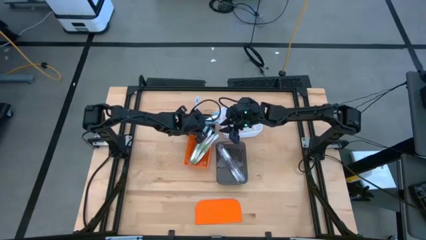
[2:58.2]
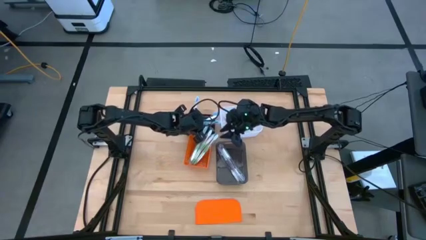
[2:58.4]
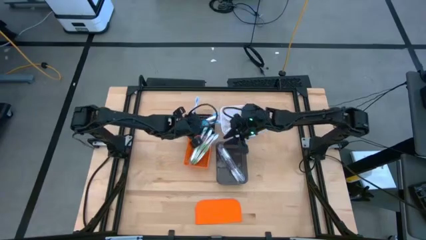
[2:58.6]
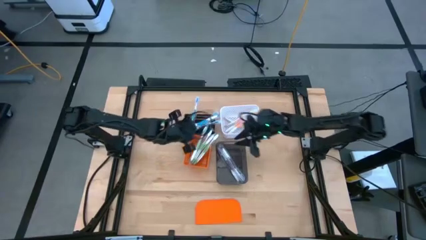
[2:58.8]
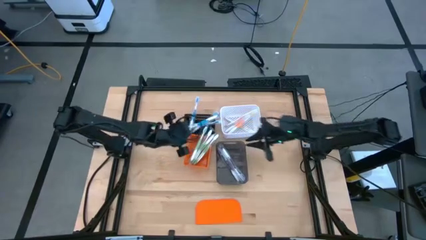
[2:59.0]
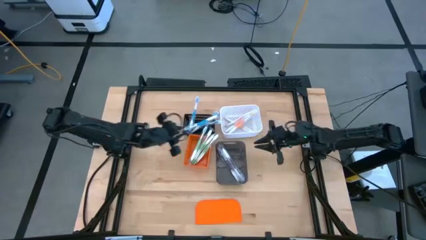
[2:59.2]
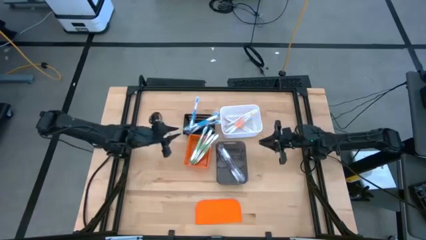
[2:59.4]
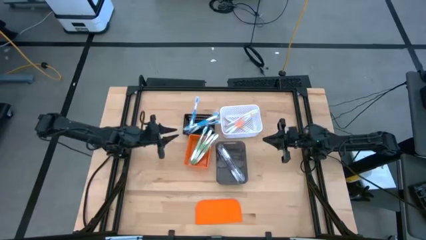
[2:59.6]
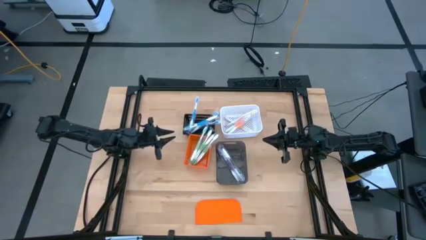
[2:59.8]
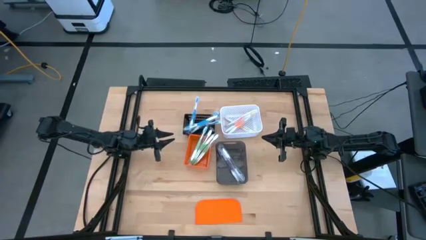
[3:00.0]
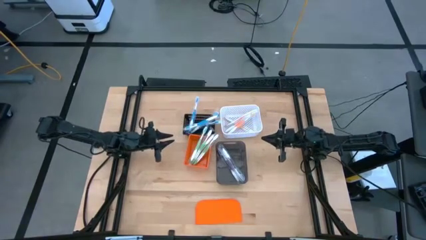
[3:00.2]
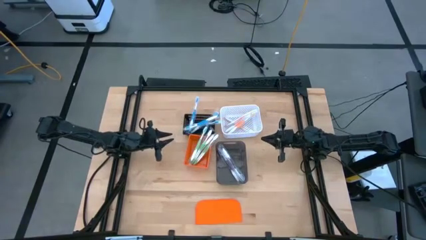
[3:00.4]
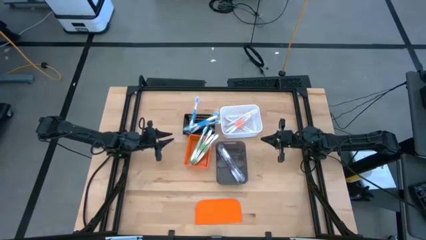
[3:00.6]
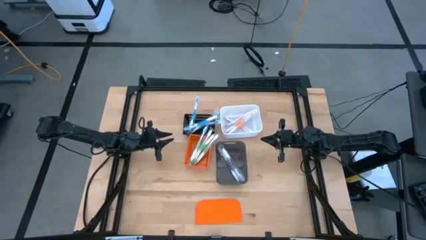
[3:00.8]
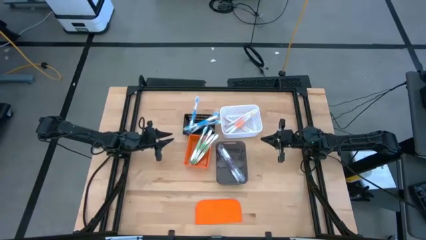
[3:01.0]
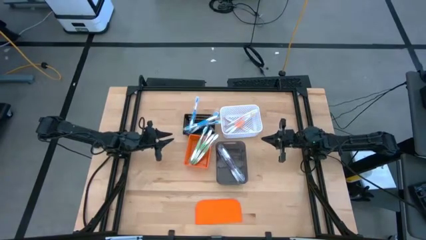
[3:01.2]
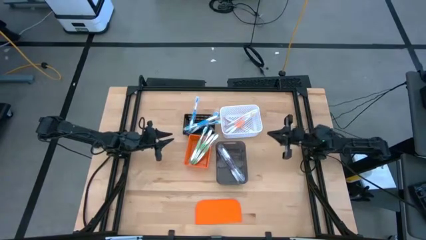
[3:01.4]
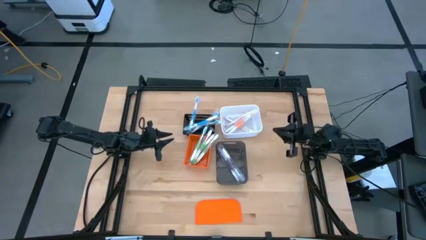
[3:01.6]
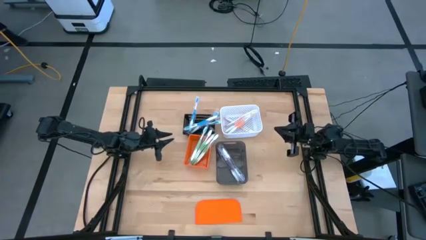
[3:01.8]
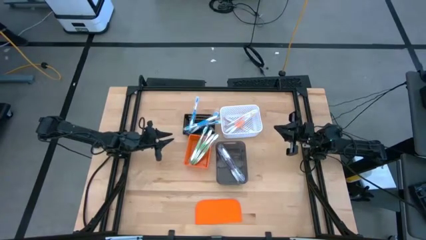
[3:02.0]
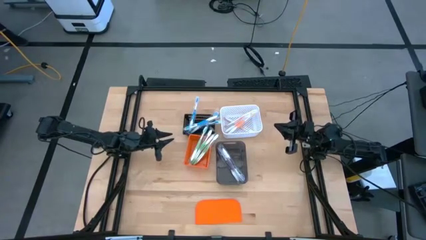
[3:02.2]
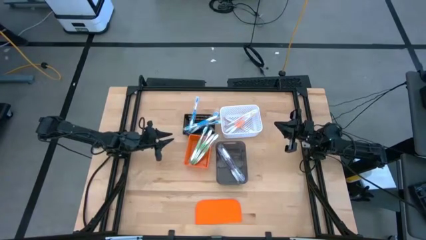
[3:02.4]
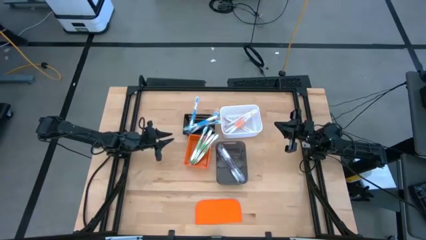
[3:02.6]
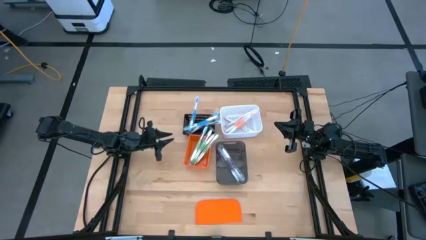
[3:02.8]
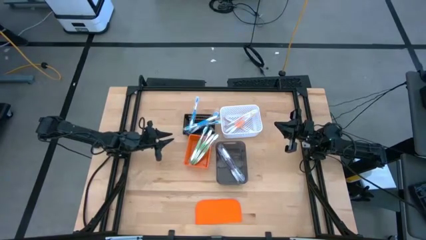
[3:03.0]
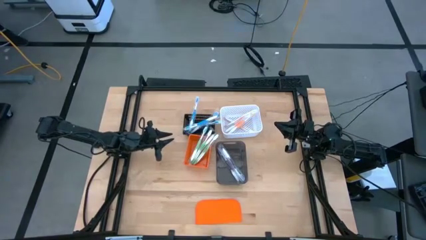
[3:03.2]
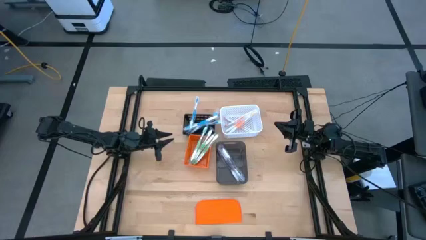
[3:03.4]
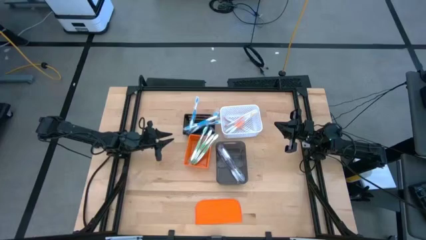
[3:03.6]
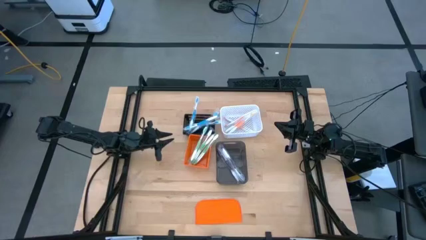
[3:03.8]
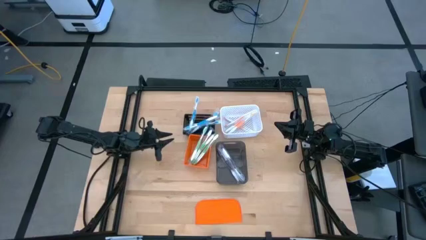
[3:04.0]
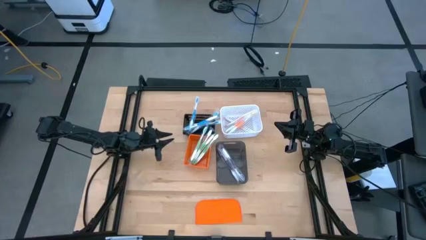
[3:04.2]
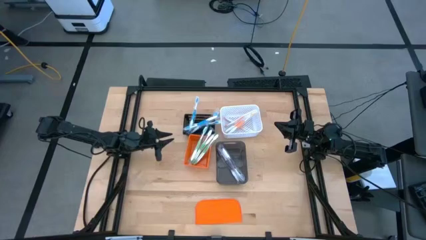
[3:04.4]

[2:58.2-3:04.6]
Task: Pick & Place Toothbrushes
Return to Home Position

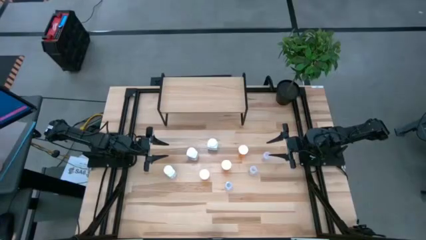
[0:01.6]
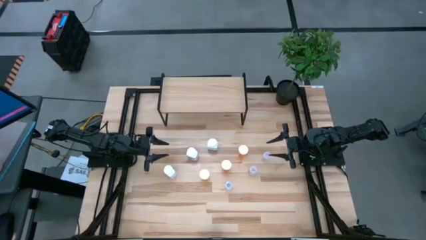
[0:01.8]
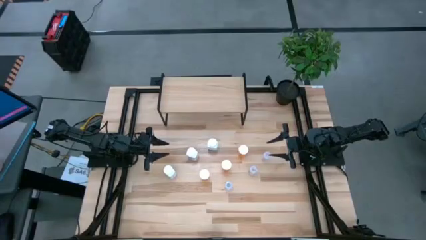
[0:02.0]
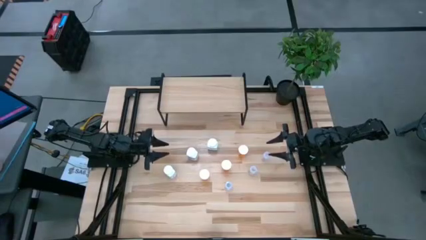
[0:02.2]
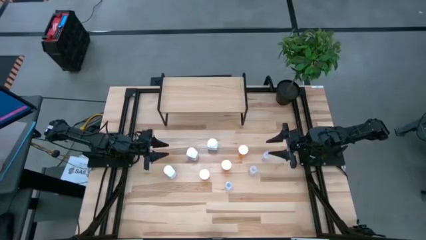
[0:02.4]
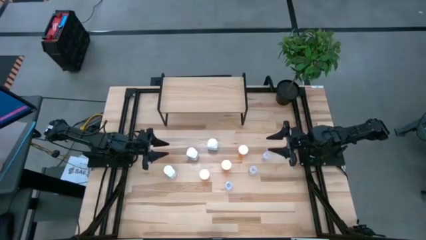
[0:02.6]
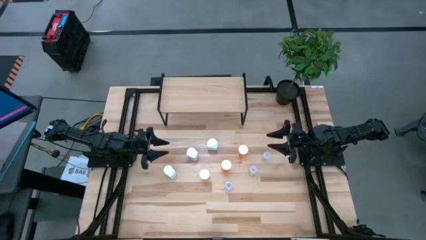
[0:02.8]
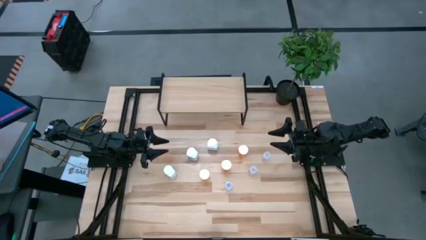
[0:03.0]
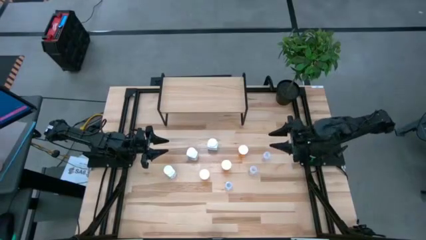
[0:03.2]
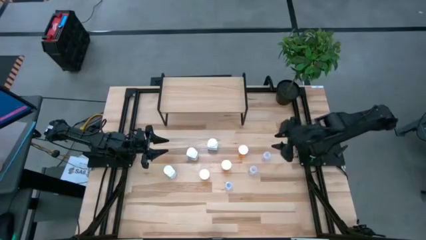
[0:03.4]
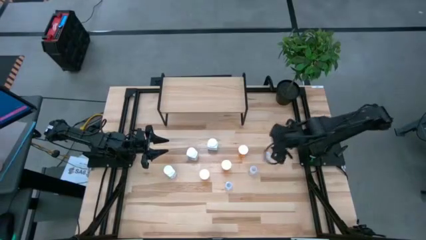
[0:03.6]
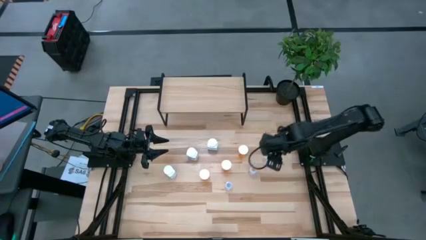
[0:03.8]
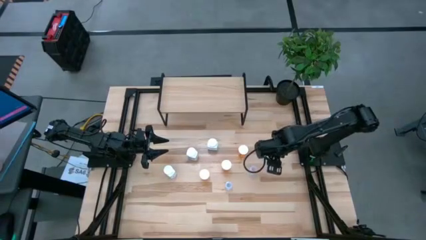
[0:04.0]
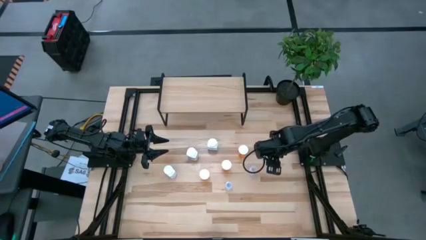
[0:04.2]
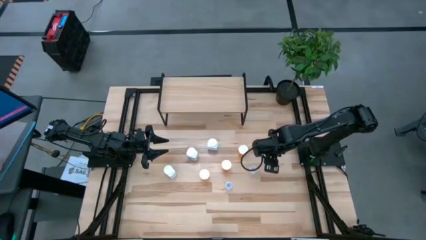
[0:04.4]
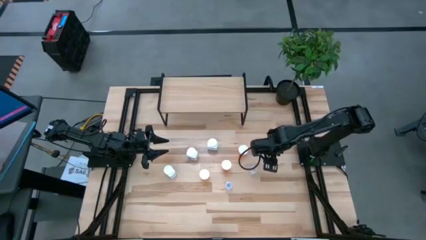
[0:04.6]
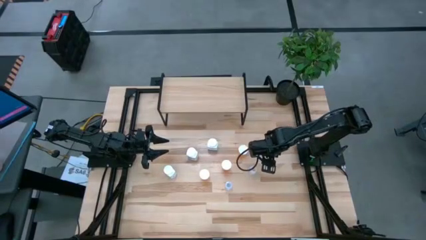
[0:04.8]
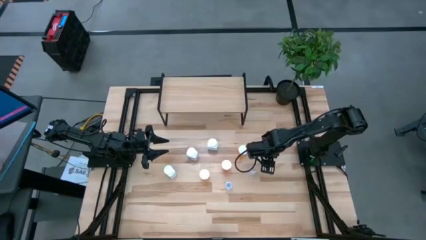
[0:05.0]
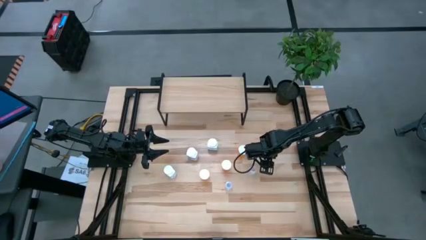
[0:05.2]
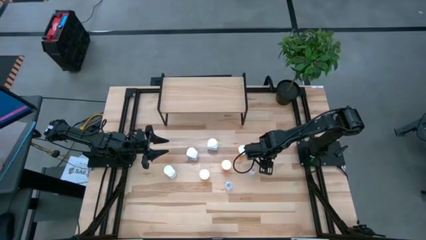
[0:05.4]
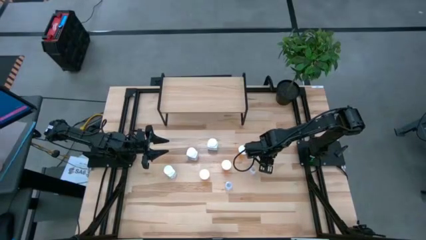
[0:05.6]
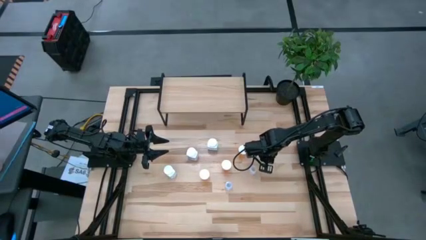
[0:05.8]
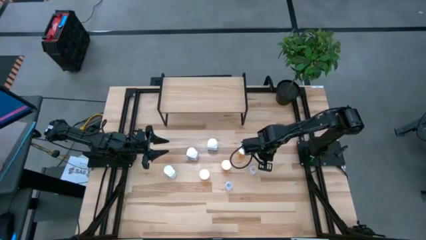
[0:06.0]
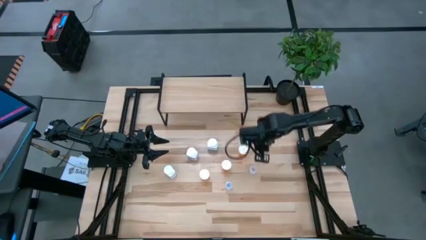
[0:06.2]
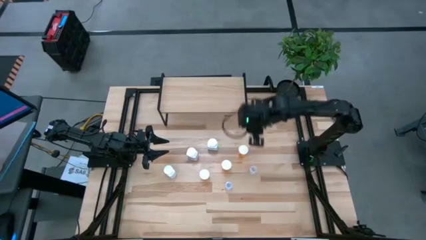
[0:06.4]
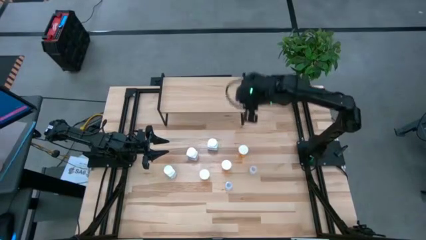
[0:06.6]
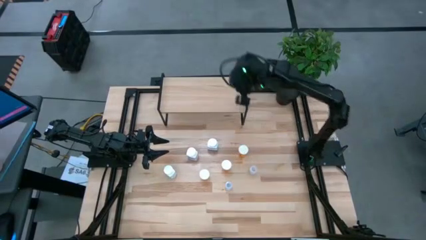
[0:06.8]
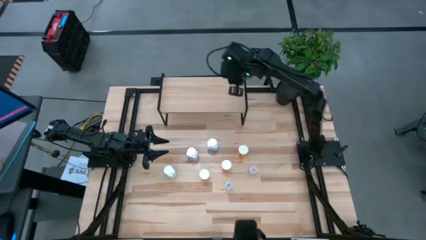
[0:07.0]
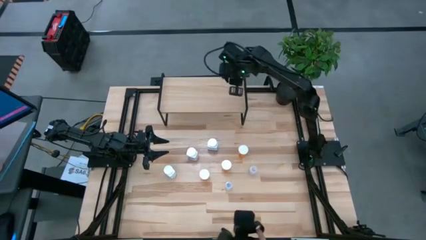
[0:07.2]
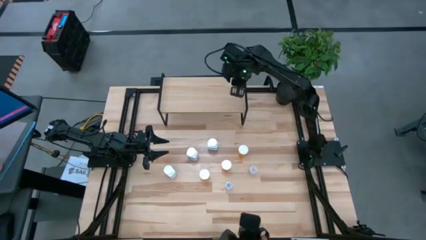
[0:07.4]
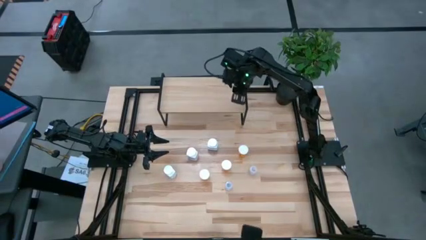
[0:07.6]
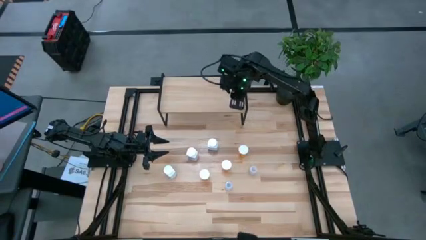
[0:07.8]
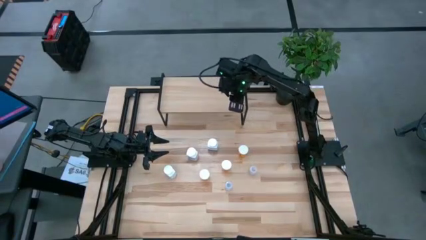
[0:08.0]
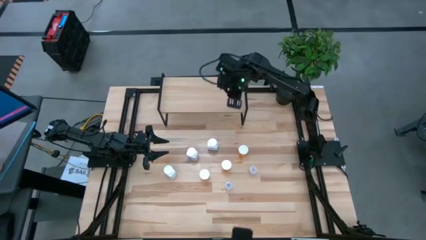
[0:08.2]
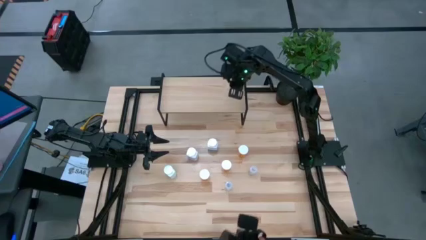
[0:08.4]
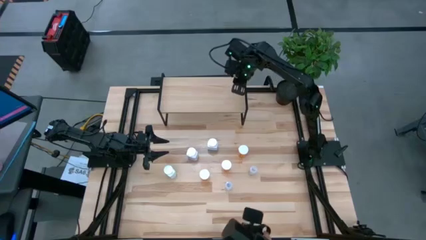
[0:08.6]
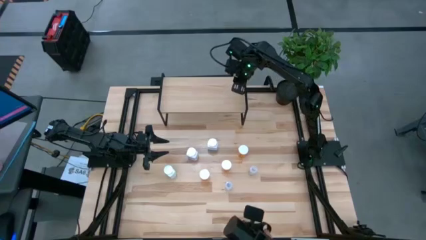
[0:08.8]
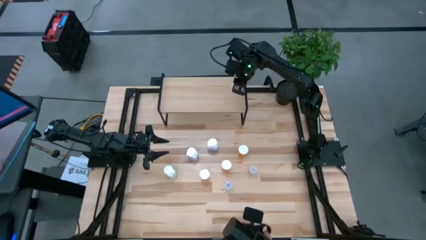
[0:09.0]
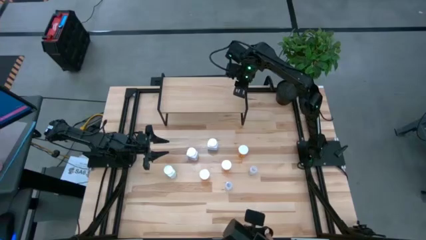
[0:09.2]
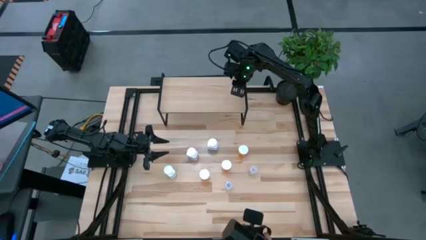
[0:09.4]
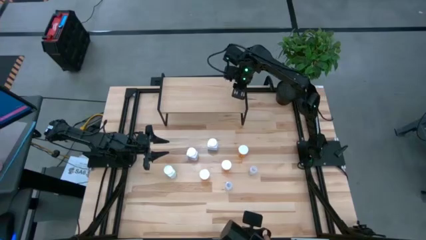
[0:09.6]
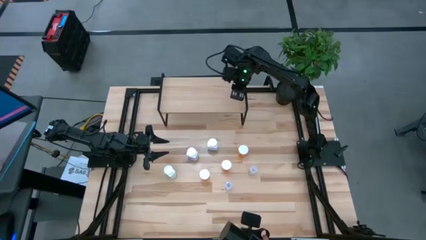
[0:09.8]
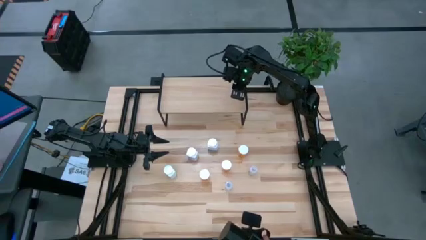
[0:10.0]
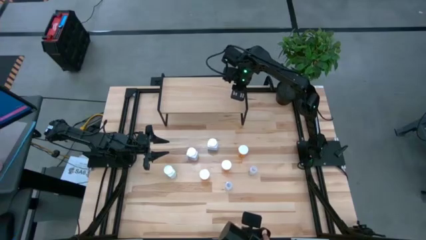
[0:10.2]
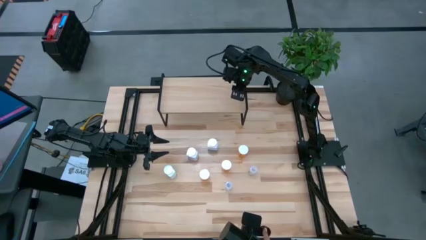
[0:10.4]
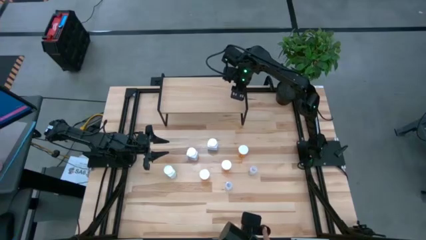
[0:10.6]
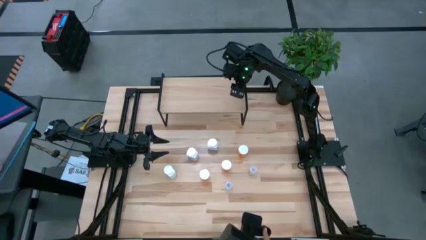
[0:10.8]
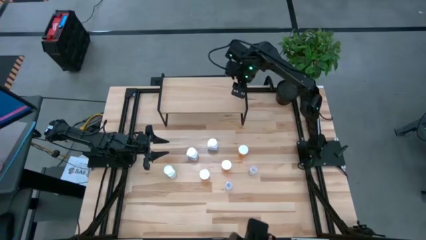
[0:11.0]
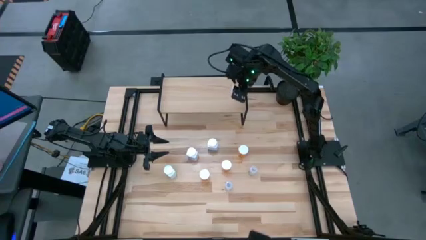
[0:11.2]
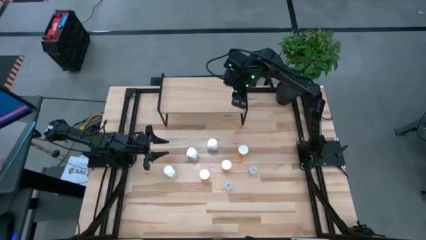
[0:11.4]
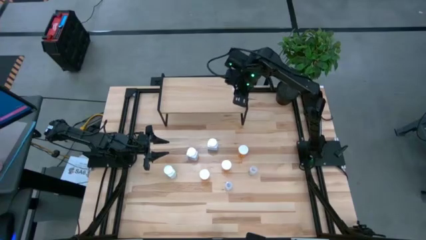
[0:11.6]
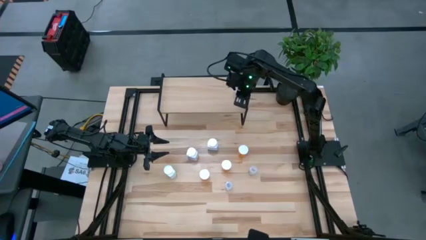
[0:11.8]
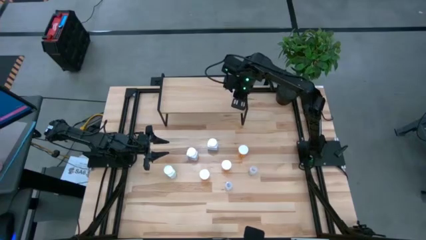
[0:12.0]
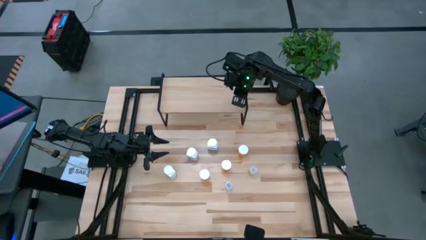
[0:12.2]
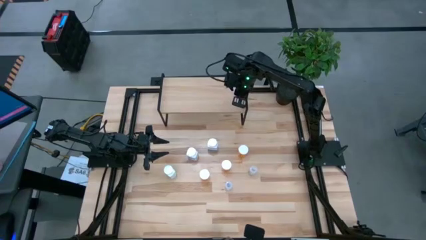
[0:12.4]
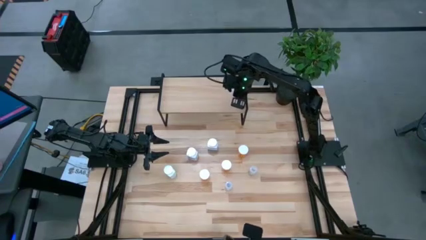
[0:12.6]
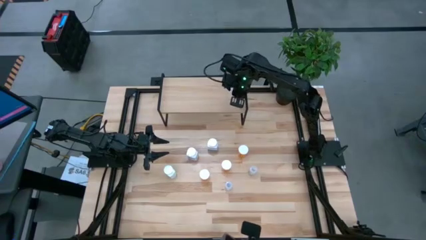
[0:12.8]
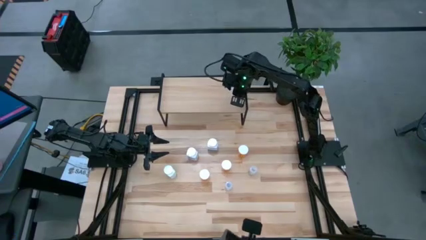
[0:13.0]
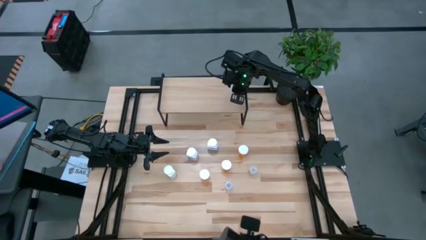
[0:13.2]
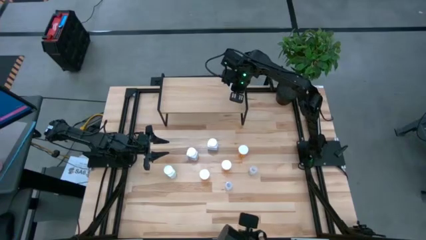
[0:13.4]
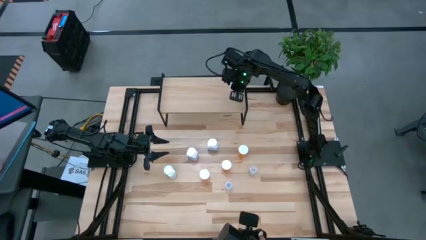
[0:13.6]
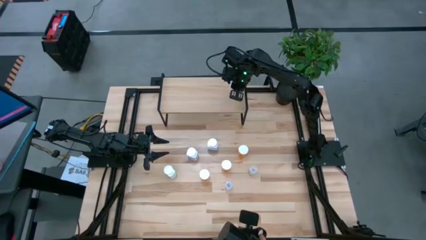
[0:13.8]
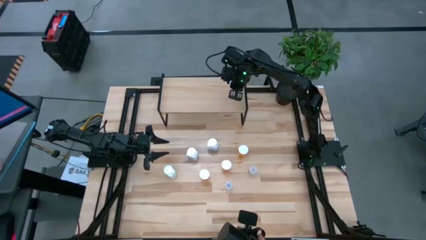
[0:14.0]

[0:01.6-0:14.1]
Task: Pick and place medicine bottles onto shelf by color
Put the top transparent pill bottle on the shelf
